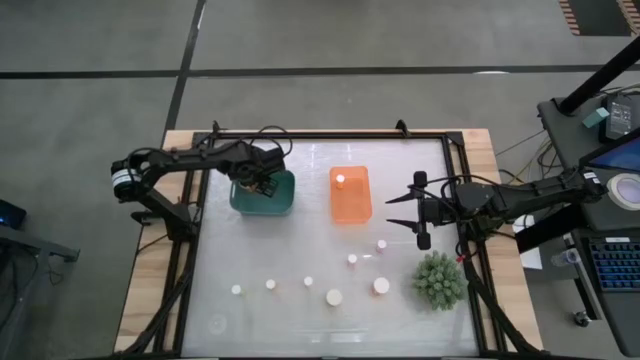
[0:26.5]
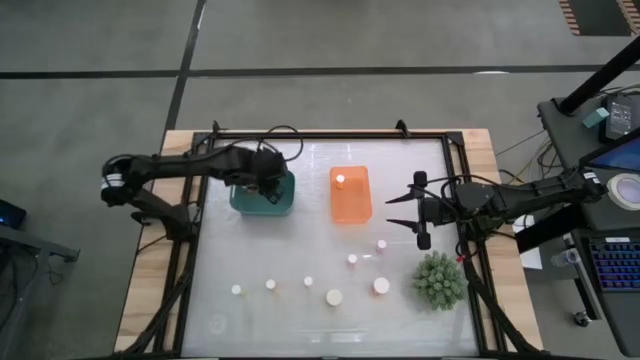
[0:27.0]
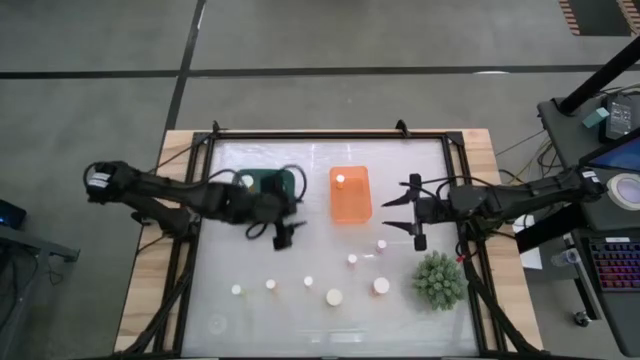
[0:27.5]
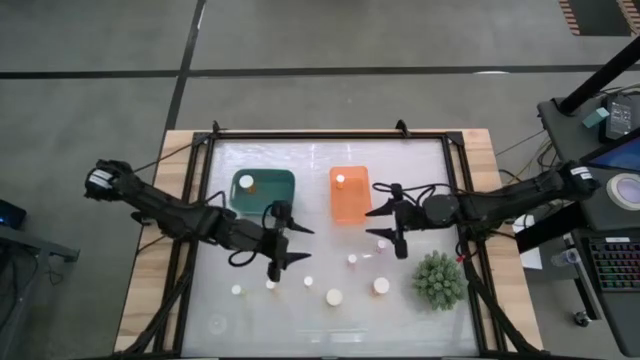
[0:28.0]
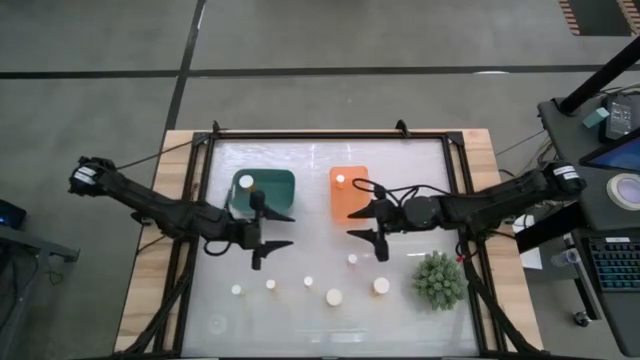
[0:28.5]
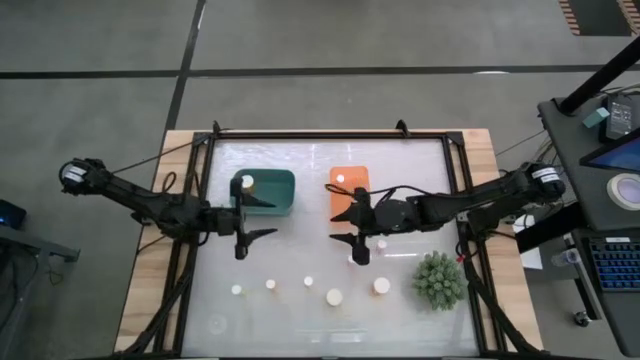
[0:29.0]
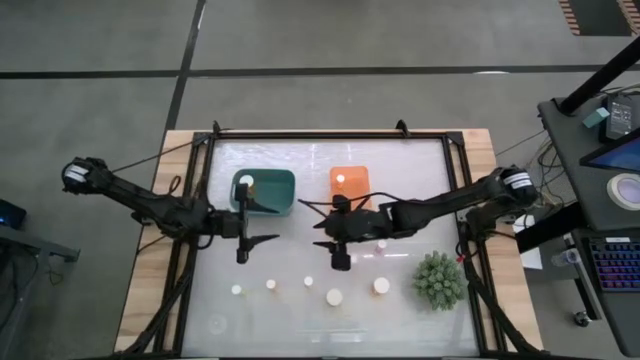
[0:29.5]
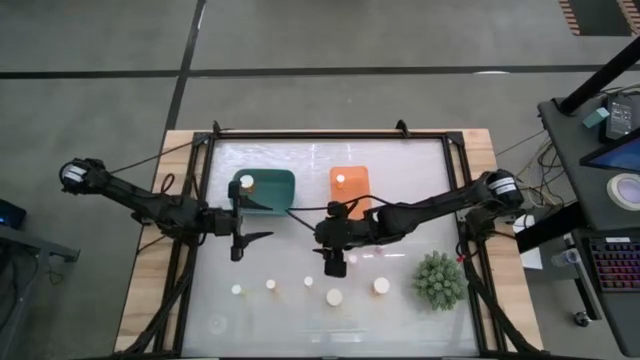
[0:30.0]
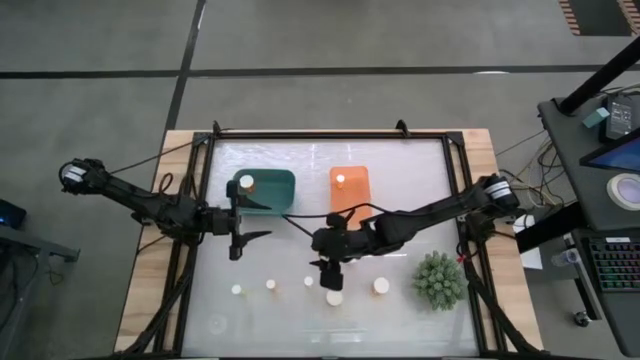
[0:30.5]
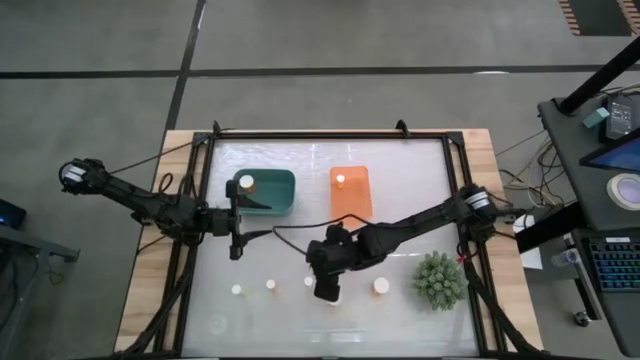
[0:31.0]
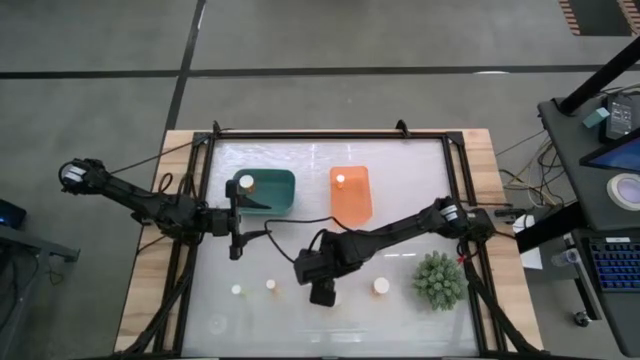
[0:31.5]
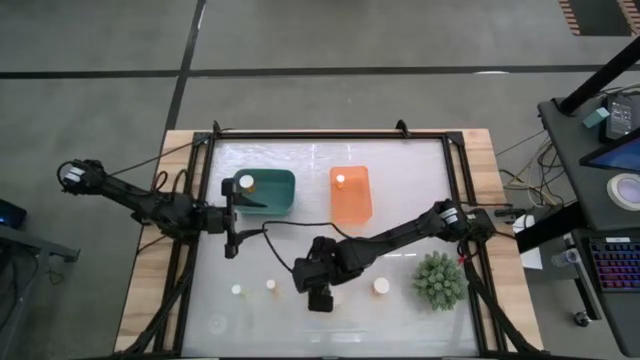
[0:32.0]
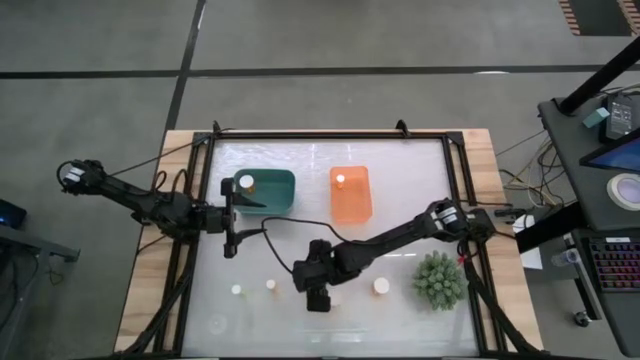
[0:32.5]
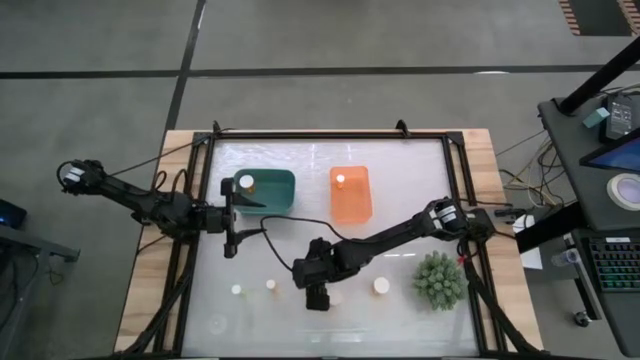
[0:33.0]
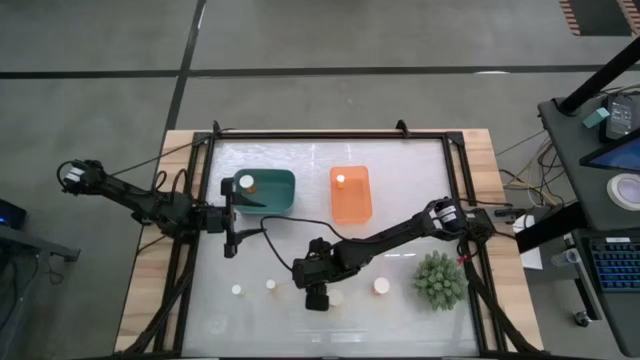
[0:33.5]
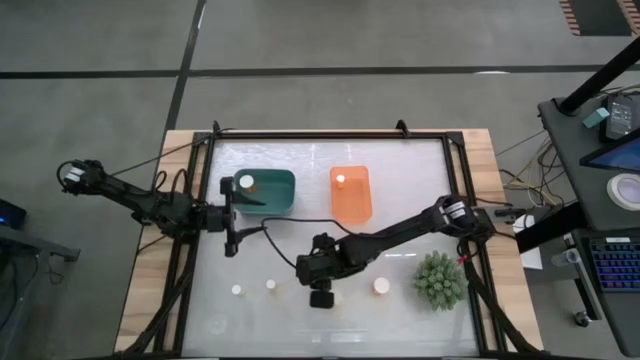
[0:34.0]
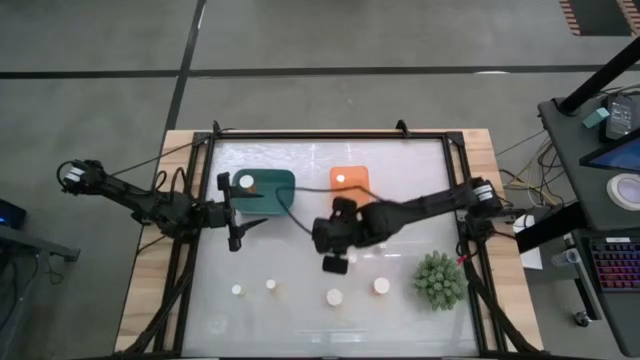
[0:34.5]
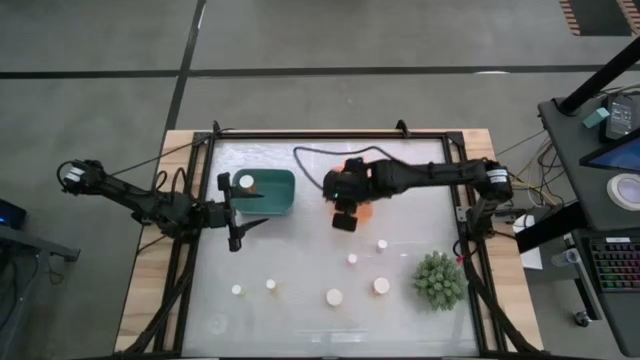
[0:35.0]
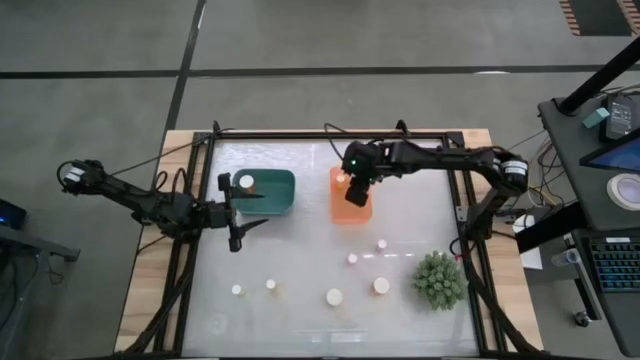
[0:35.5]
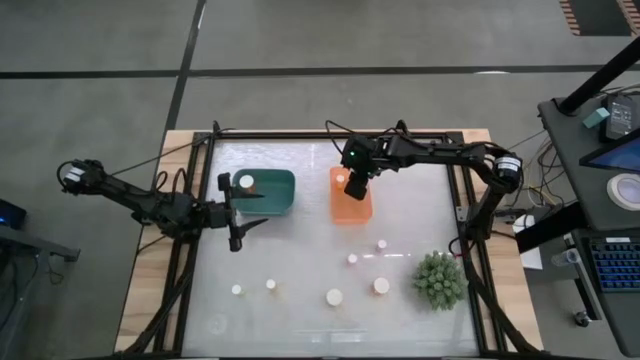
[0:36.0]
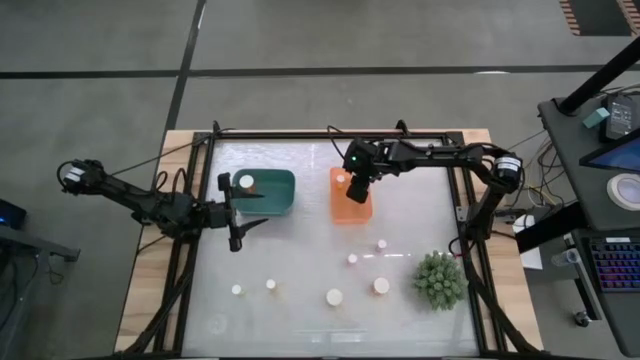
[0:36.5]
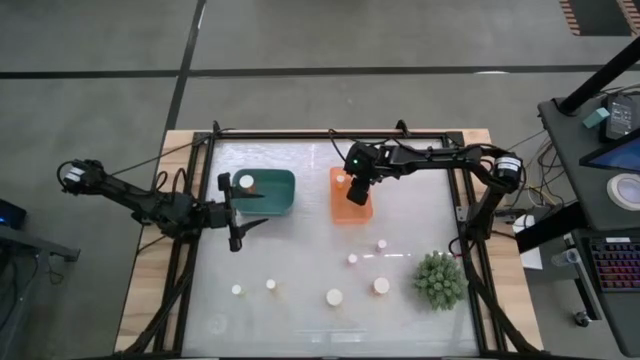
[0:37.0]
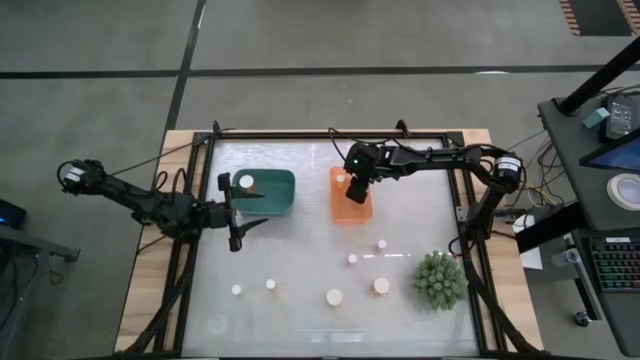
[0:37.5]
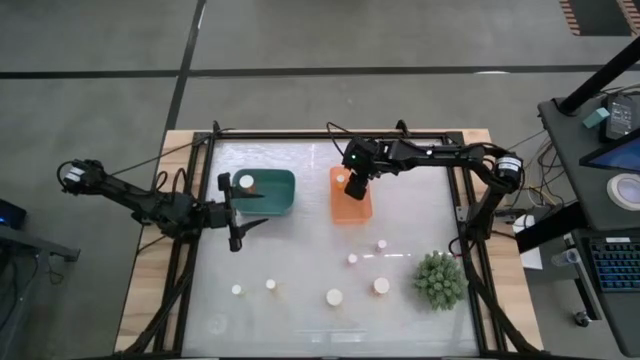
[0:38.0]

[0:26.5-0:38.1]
Task: Pick and place medicine bottles into bin by pill shape (circle, oval)
Put the right small yellow pill bottle into the orange bin

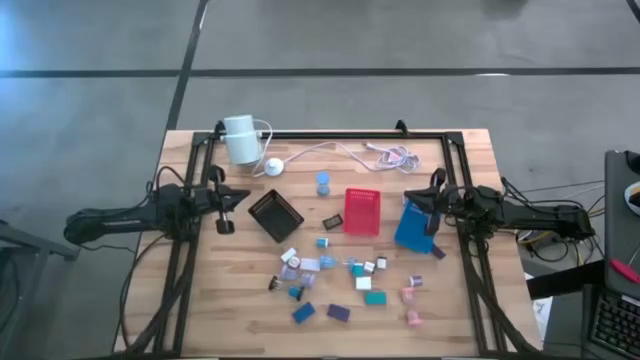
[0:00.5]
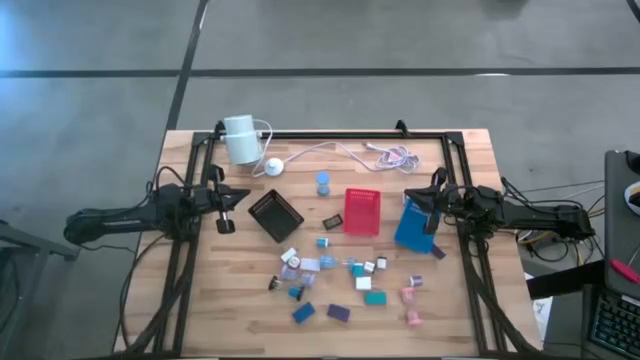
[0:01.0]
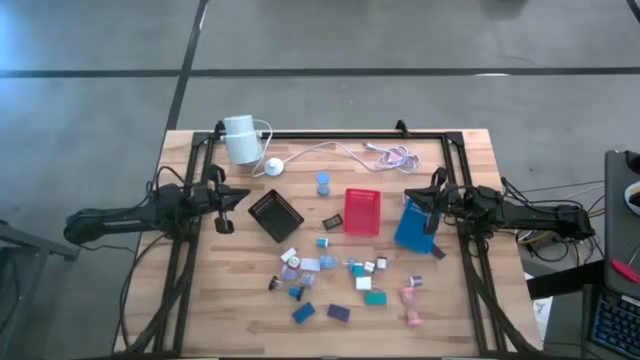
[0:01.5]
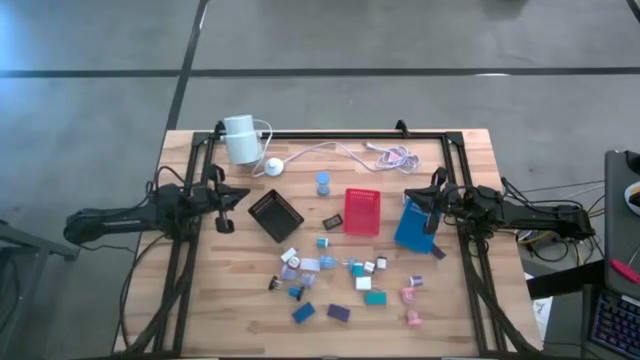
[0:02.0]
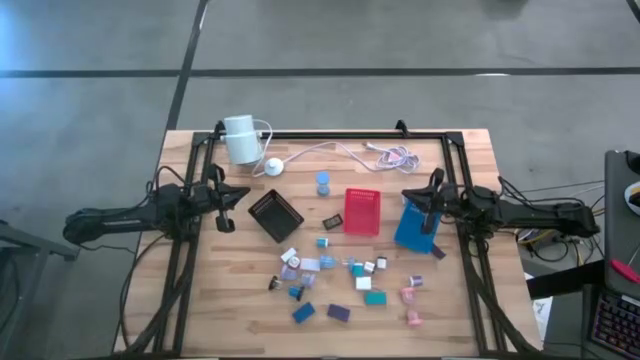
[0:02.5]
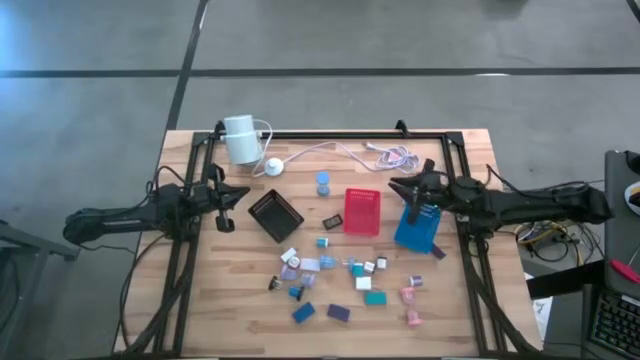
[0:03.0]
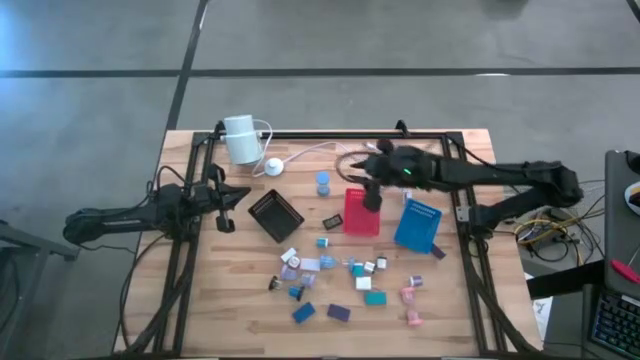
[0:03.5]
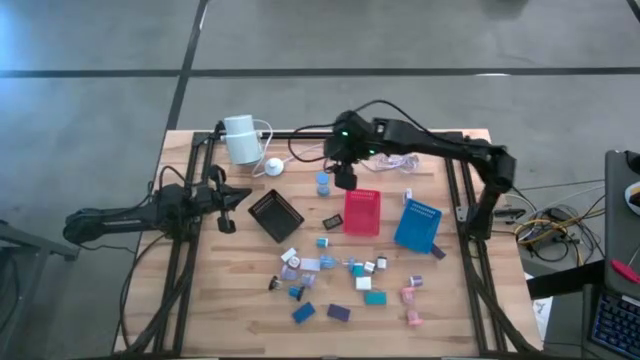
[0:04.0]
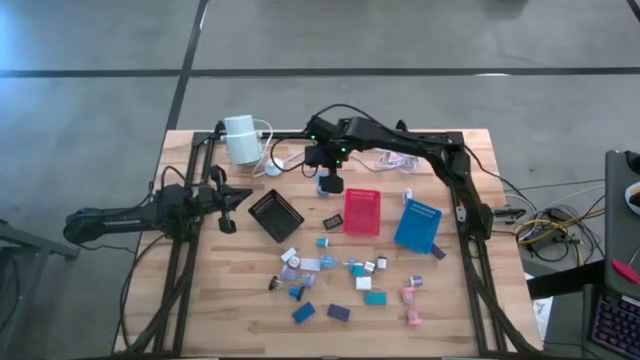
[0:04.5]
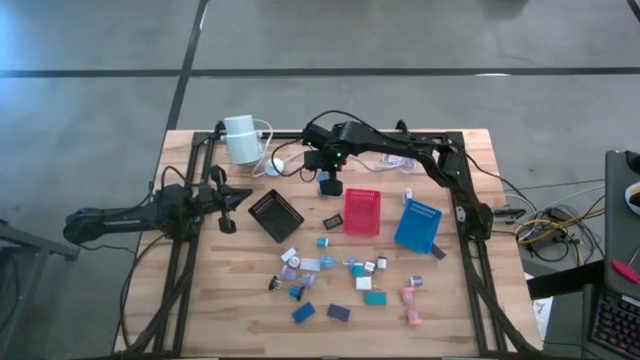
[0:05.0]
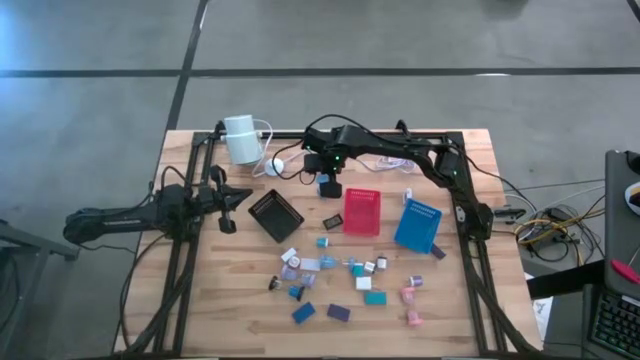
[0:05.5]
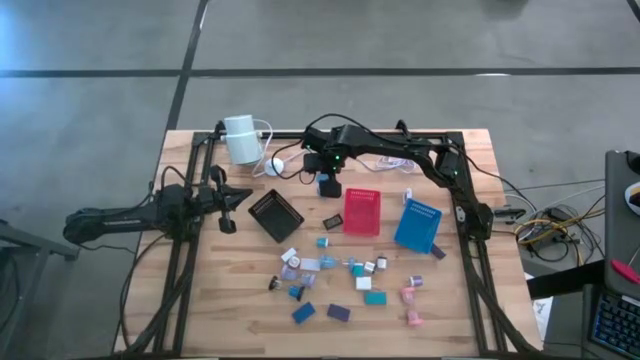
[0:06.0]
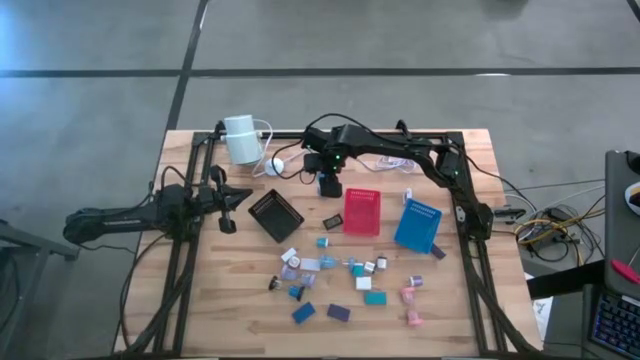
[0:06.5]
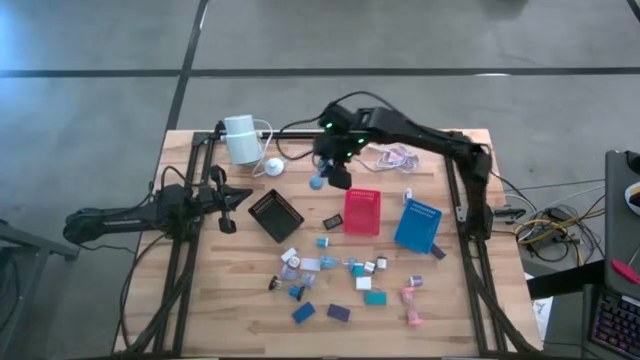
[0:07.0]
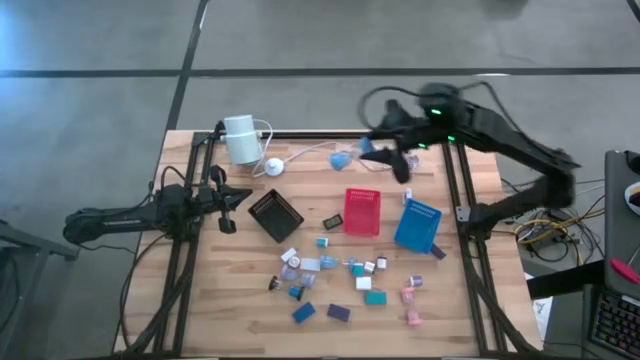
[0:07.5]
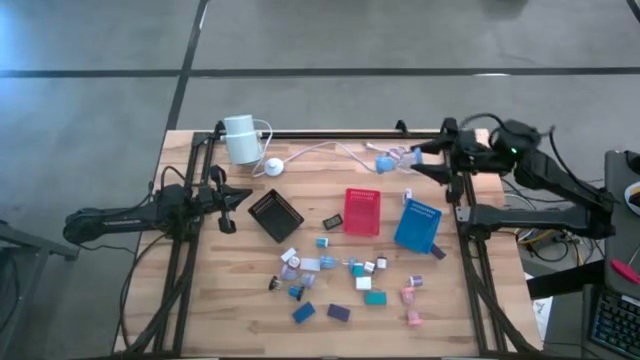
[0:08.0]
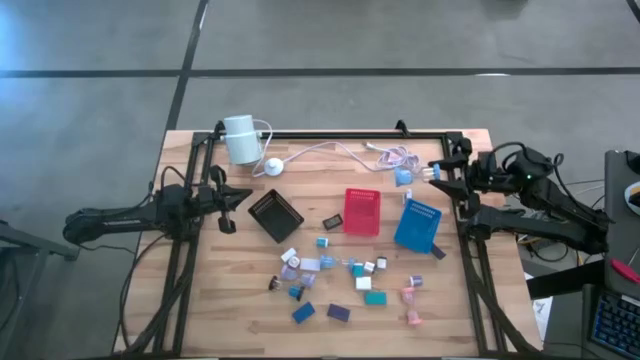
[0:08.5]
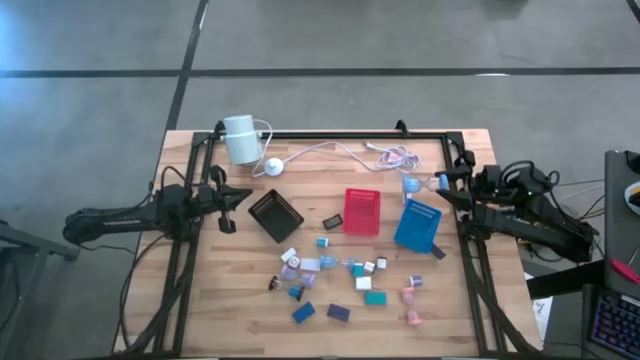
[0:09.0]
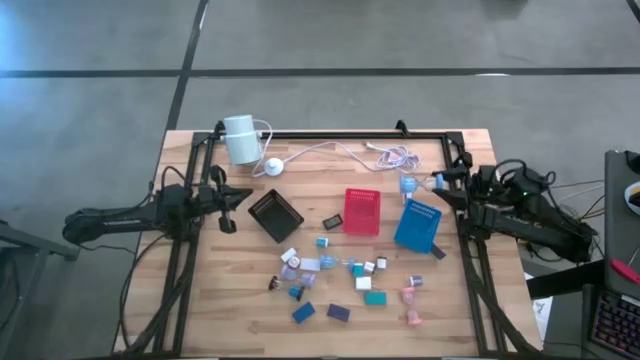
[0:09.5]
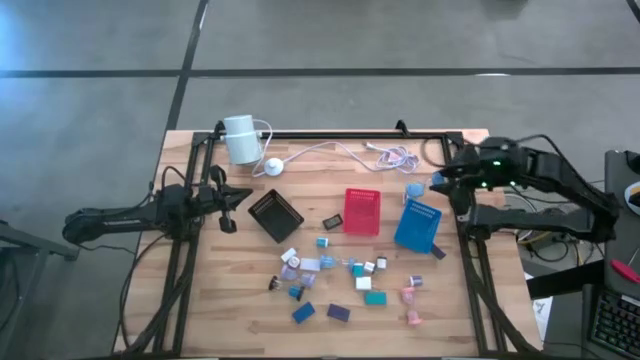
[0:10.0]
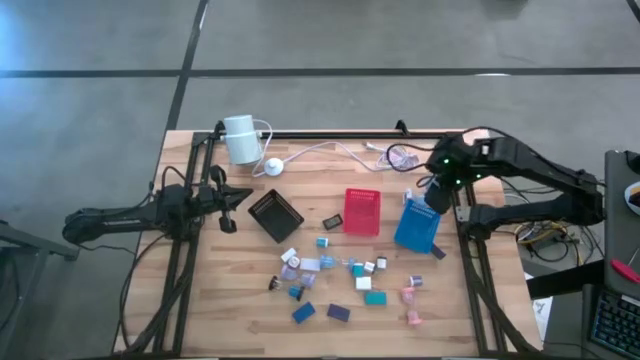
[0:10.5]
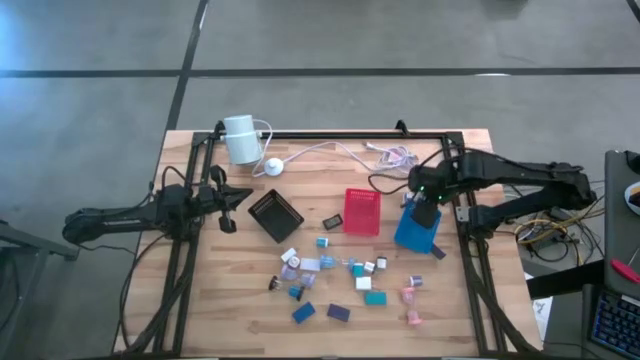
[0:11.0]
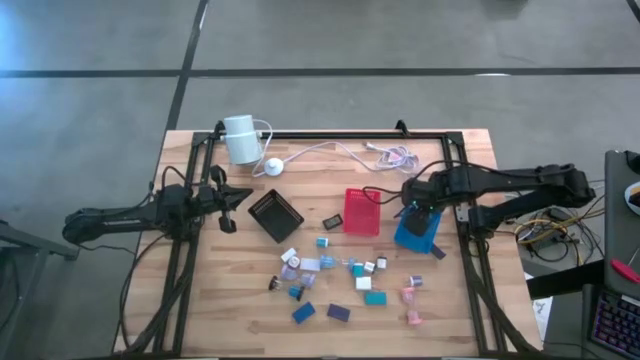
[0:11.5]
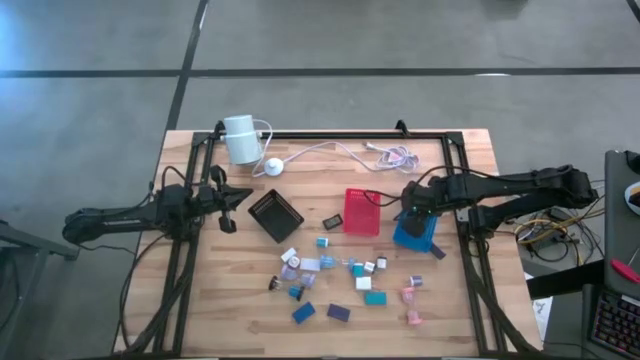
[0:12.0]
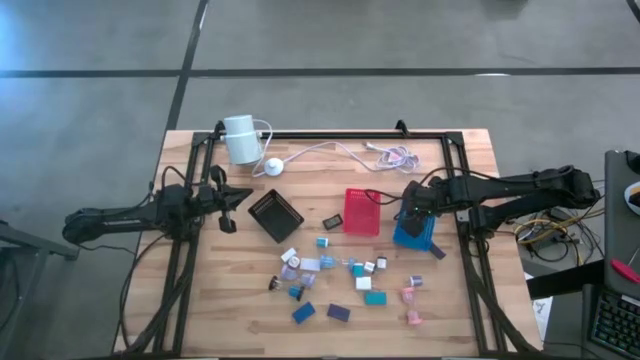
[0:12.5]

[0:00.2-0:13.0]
Task: Pick & Place Office items
Put the top light blue hourglass into the blue bin
